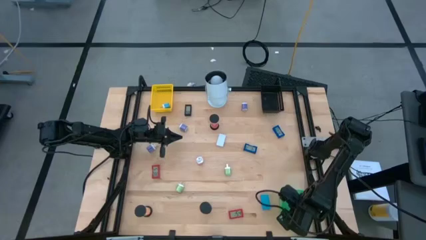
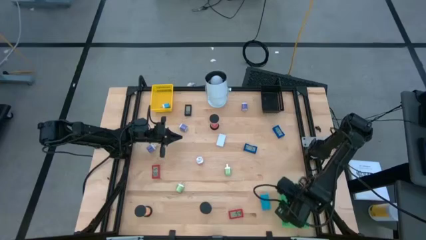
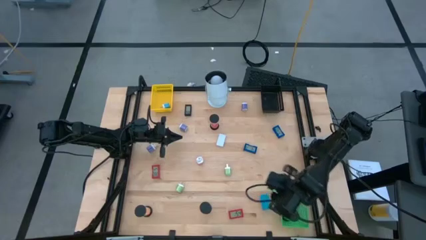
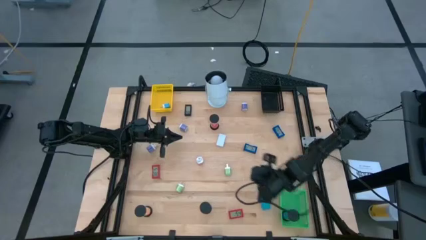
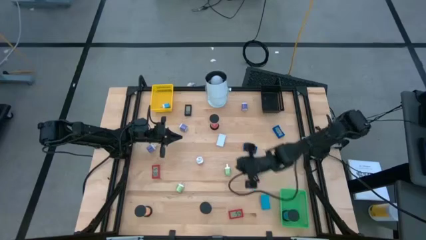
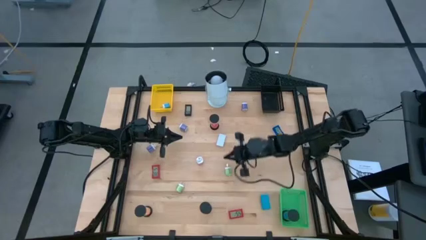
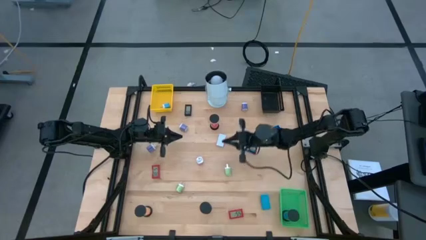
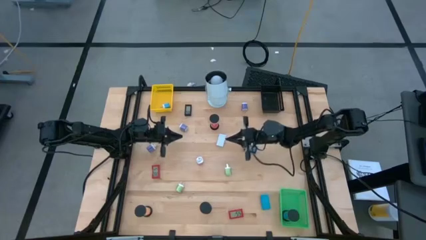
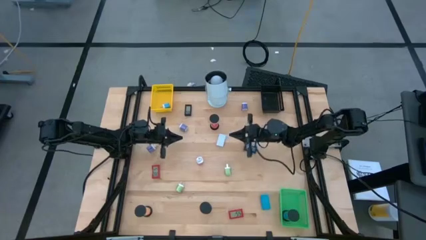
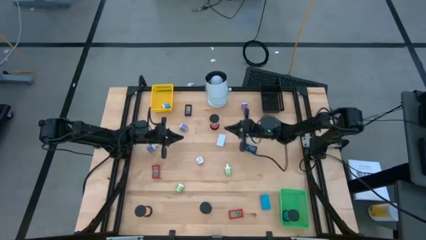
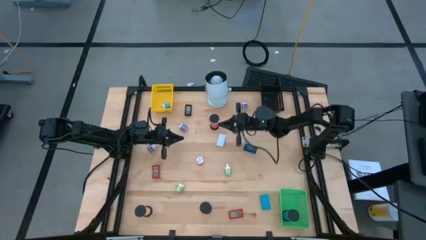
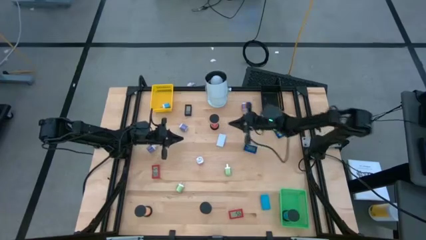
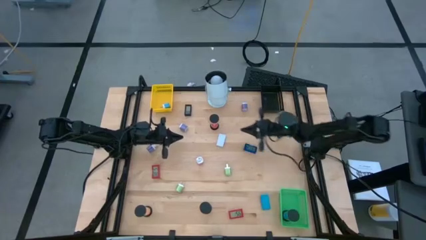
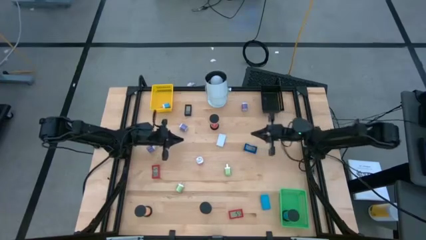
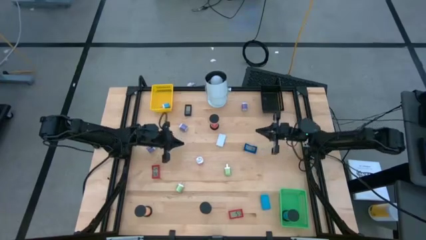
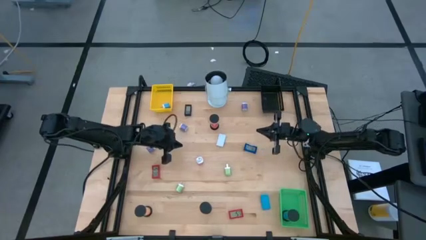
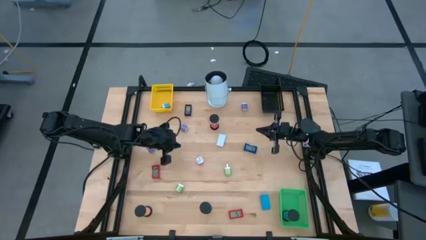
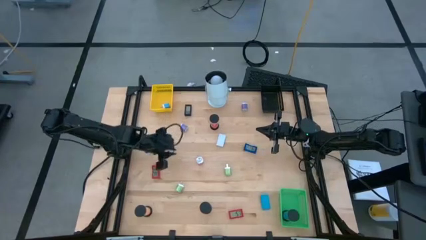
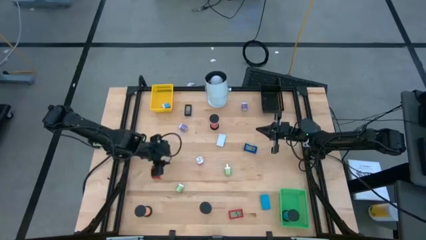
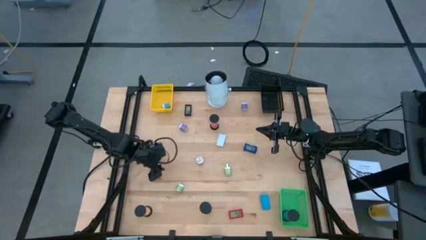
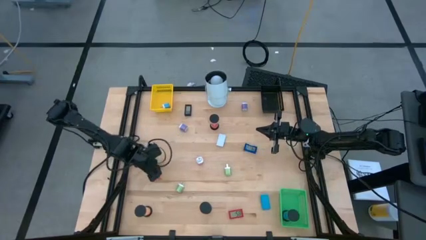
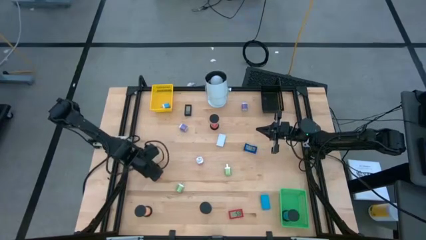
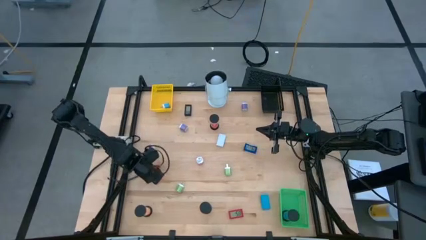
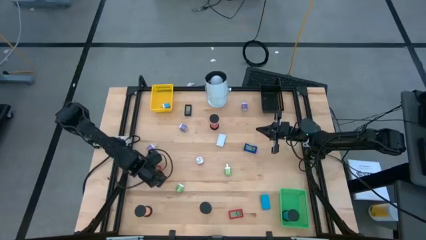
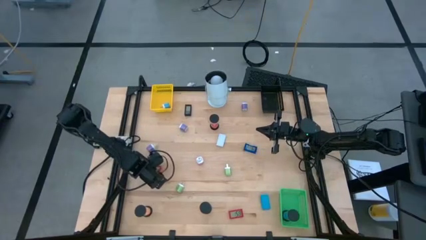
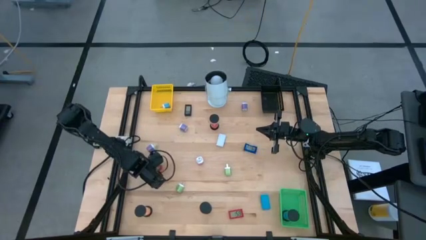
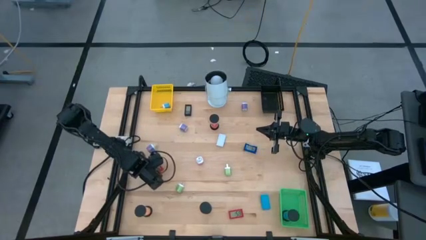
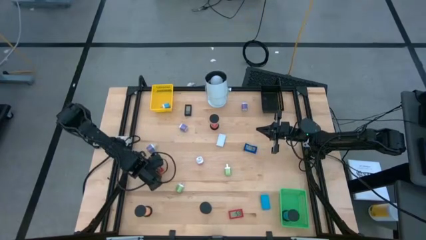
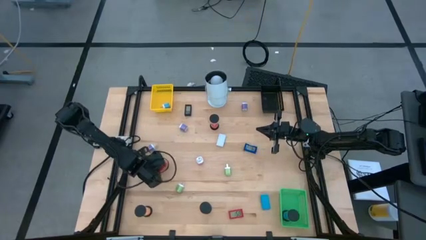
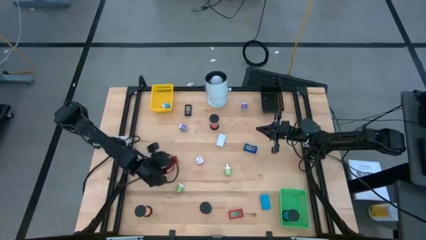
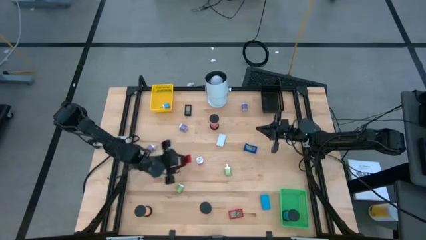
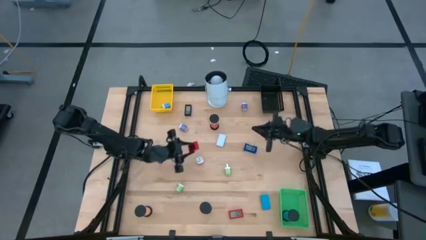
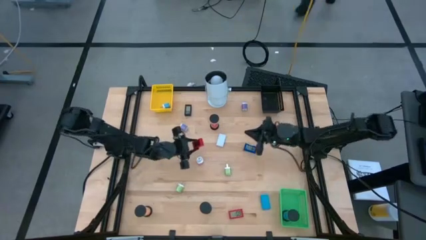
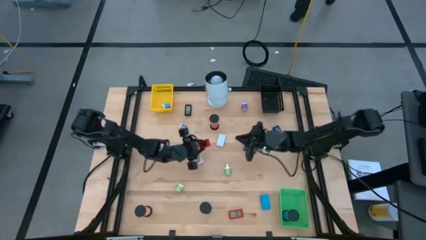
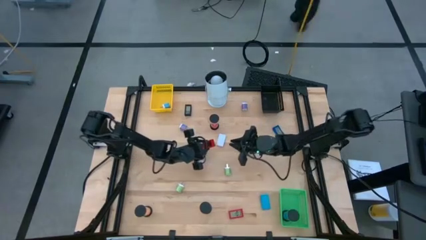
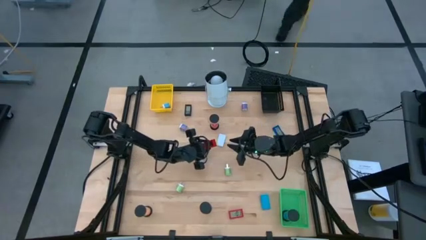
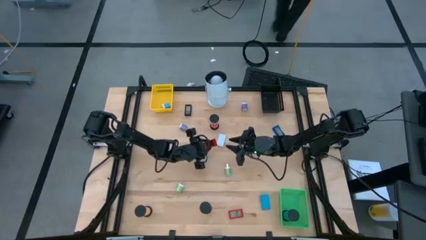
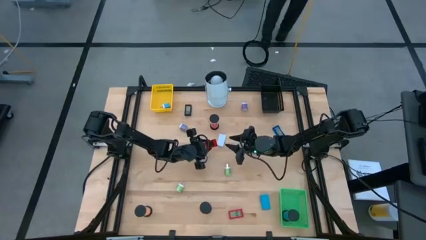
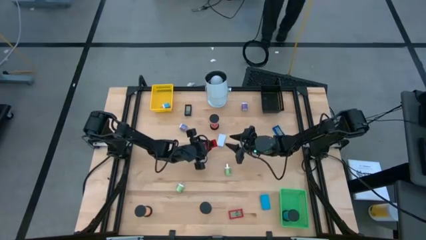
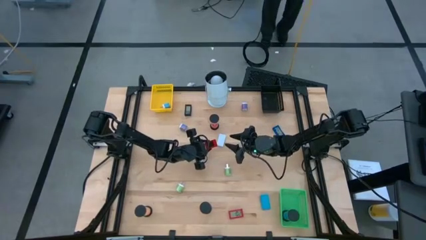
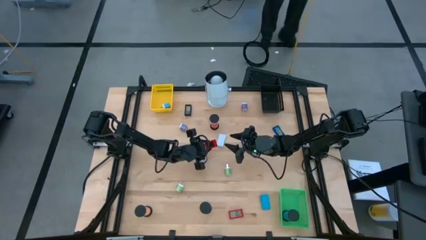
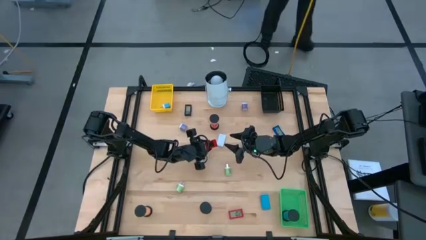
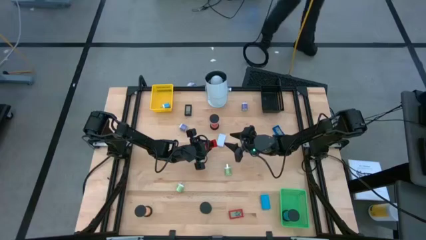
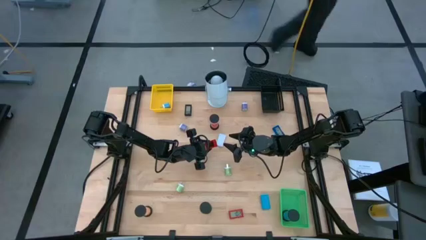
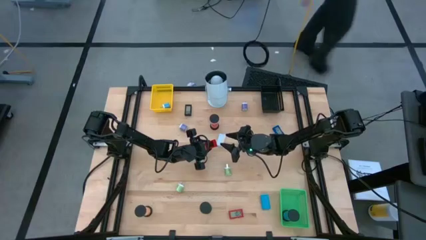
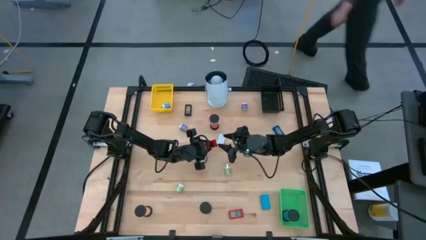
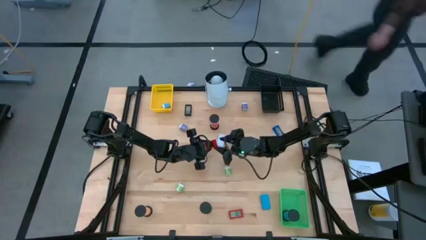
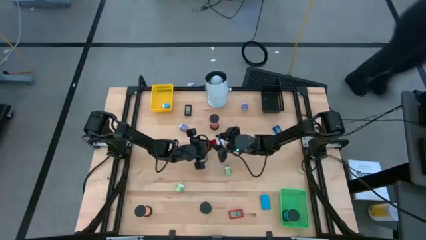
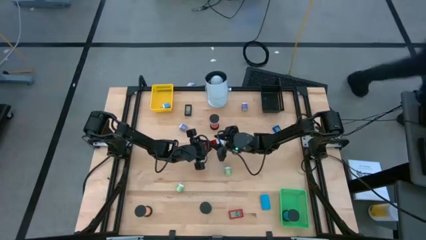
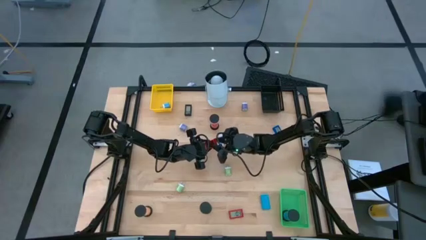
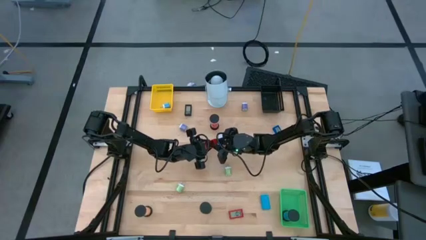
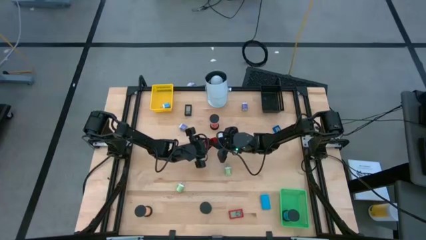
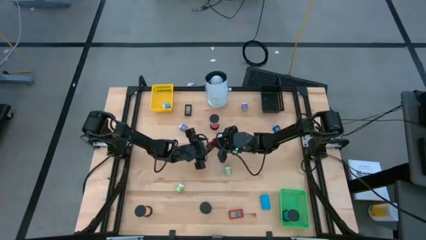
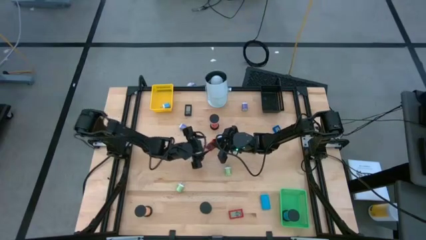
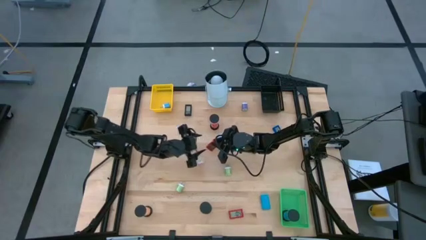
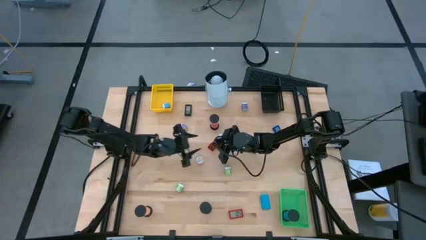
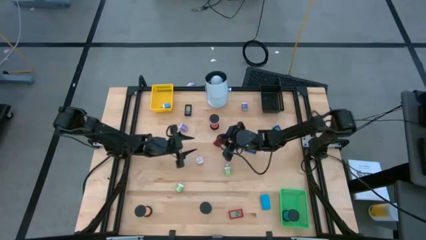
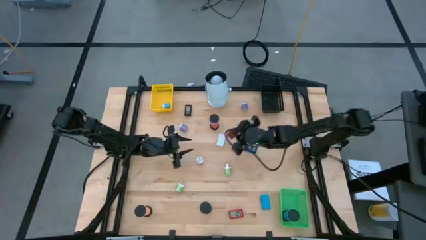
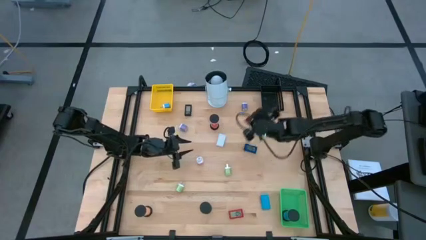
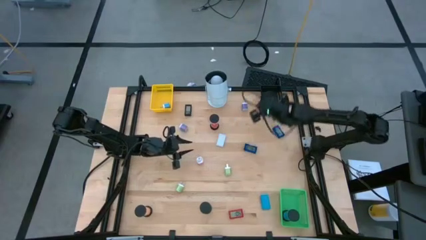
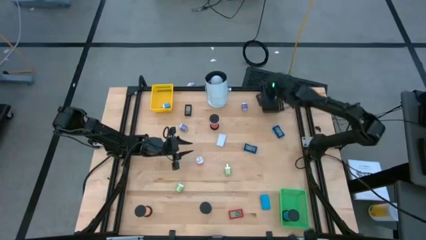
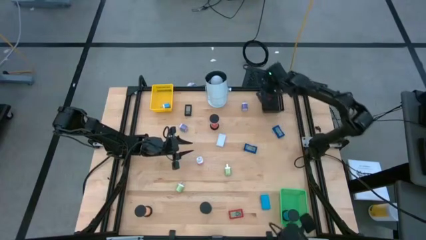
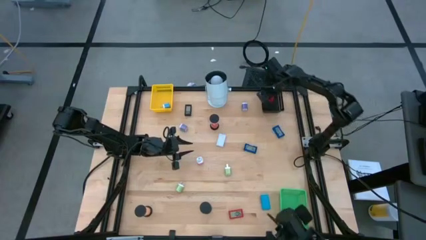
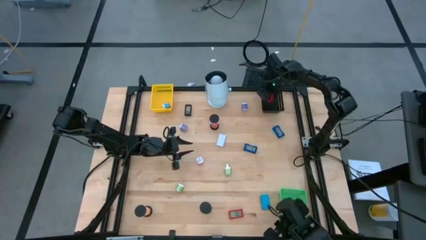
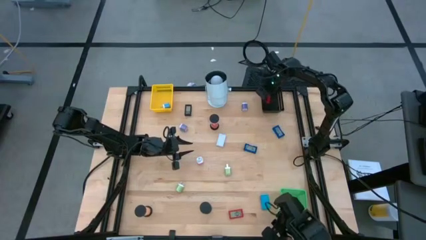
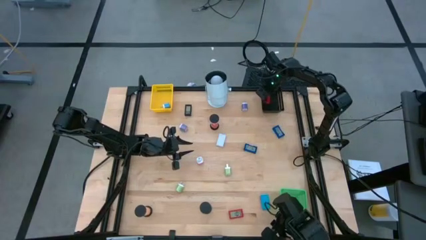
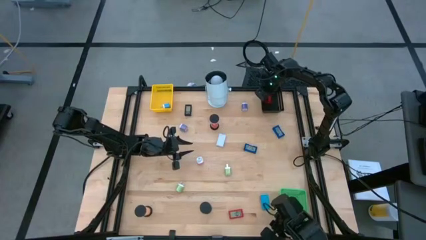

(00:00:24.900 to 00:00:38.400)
Task: Pick & Place Office items
Put the red timer into the black bin

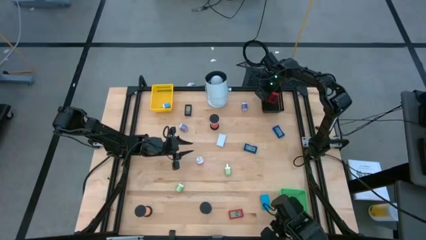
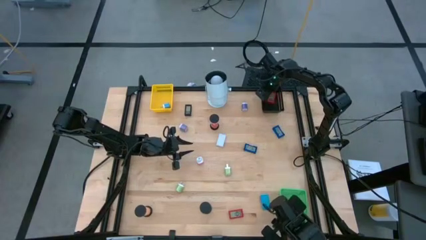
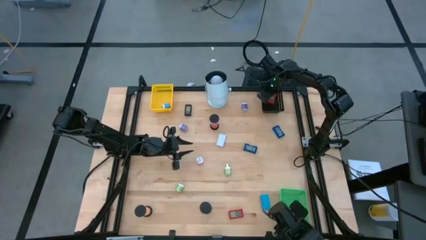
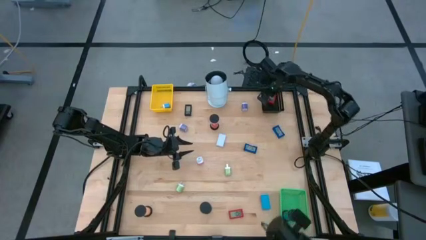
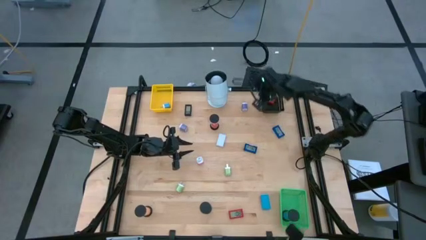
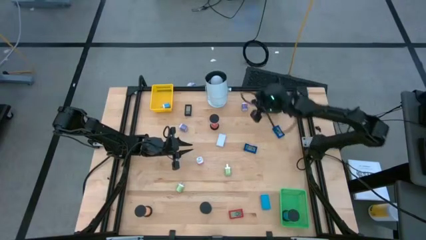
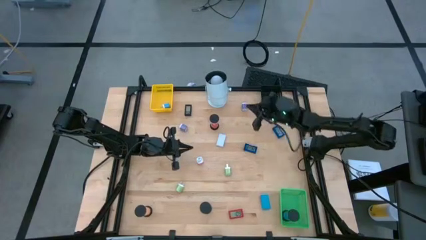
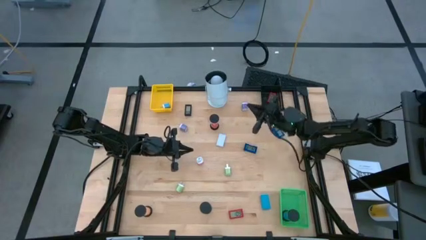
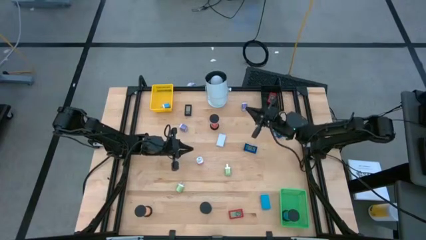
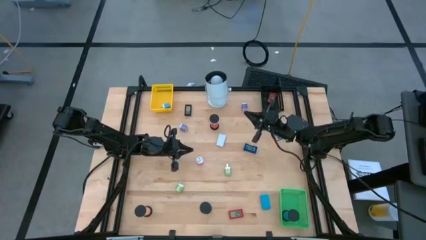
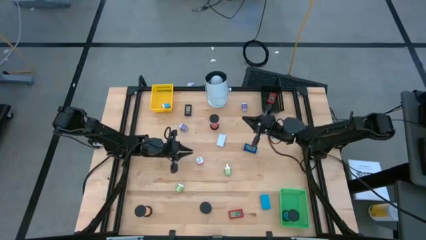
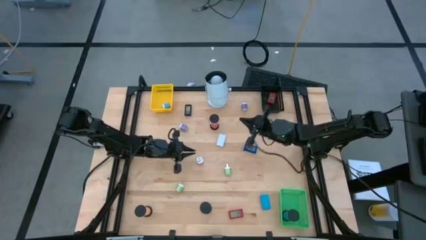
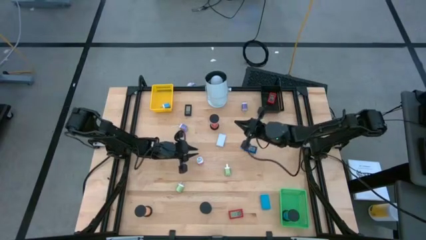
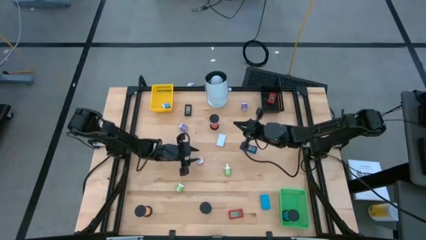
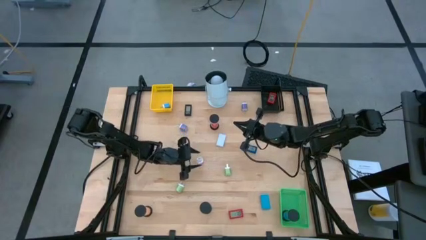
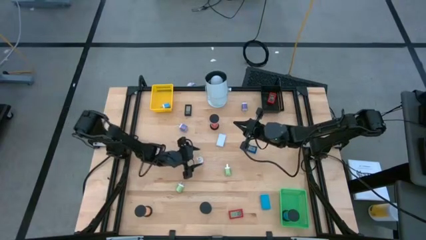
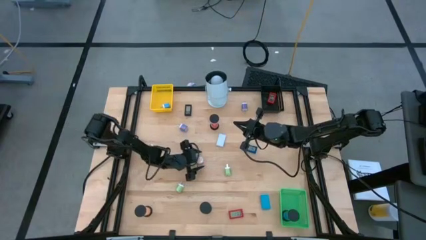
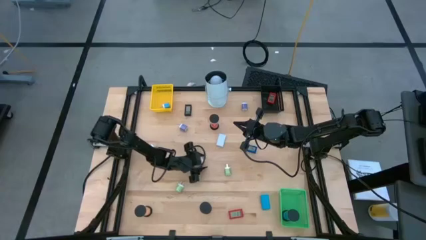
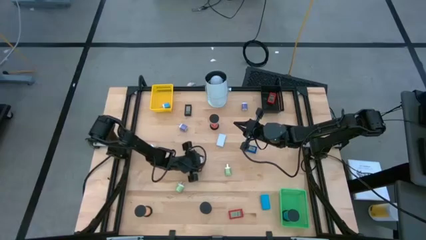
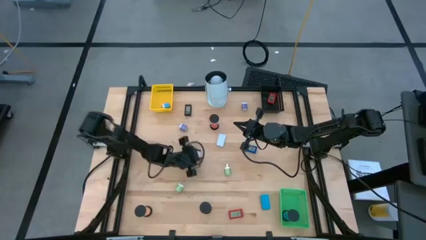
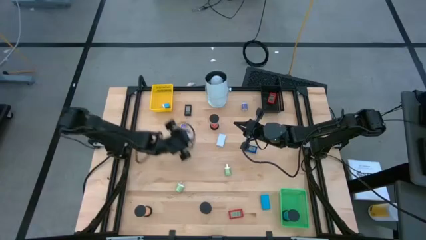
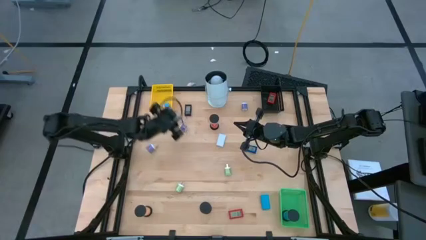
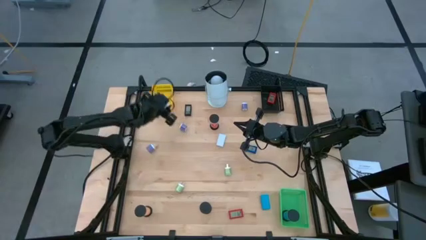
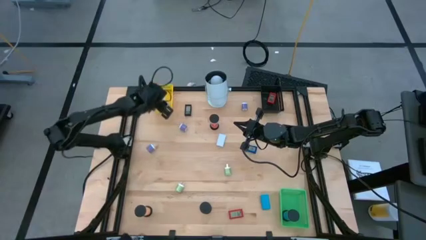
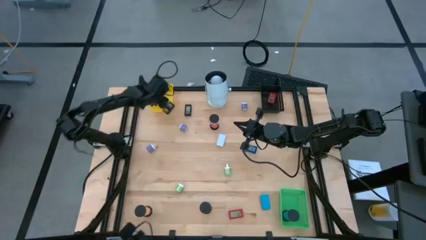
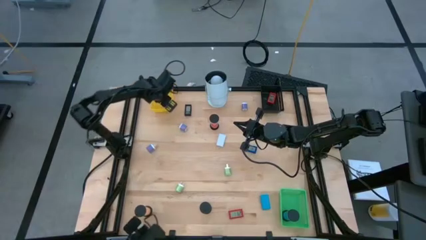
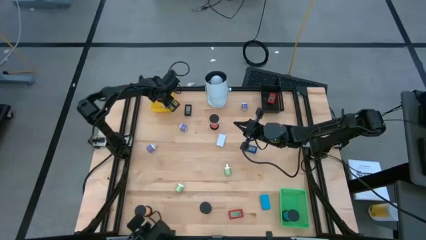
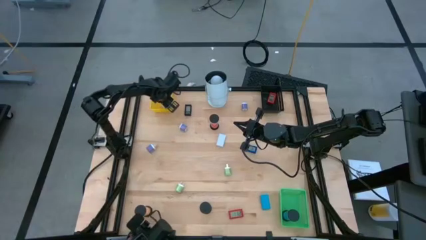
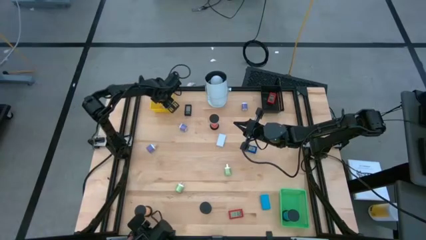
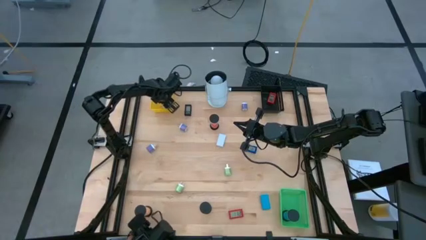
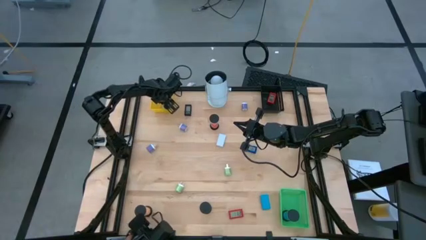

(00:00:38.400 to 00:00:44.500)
Put the pink charger adapter in the yellow bin
